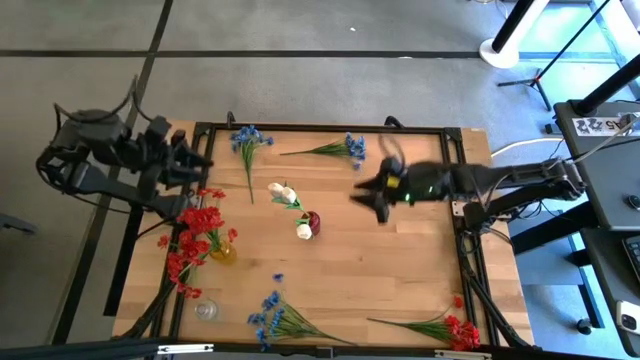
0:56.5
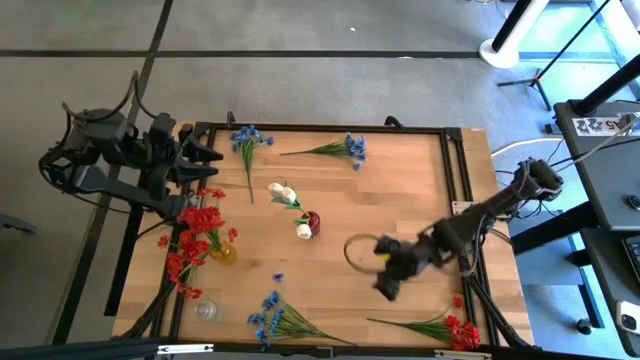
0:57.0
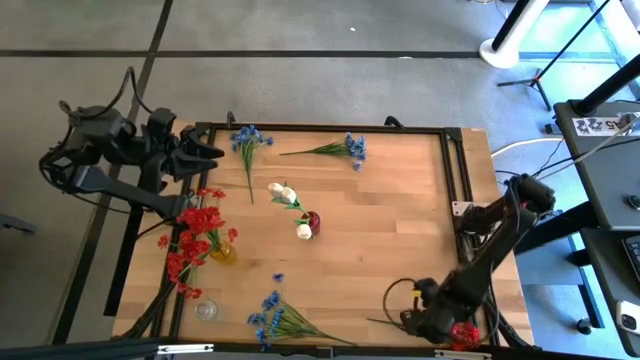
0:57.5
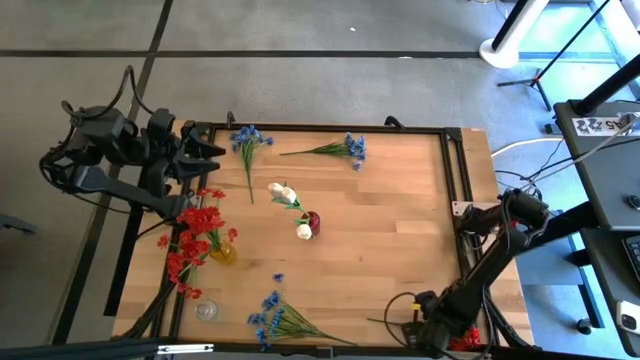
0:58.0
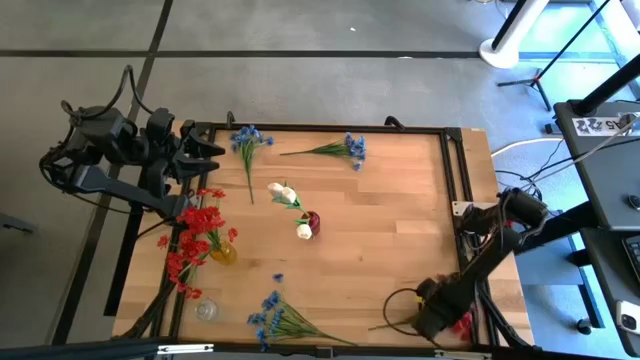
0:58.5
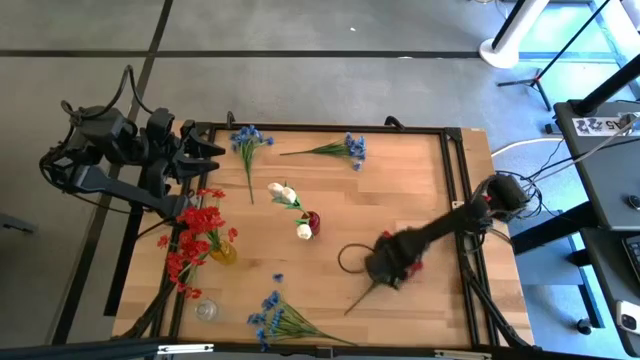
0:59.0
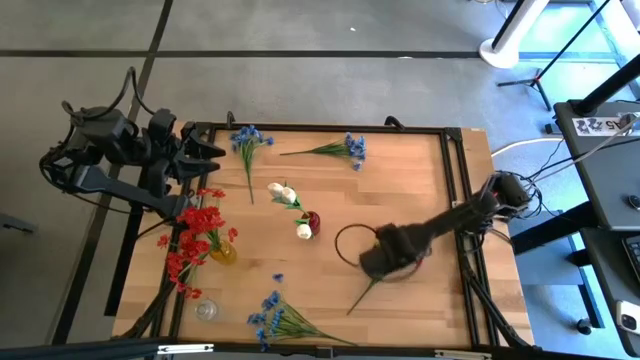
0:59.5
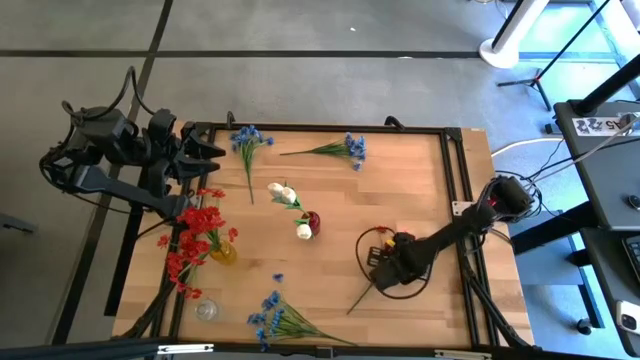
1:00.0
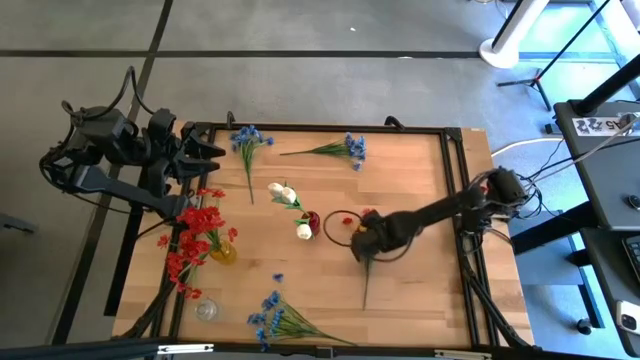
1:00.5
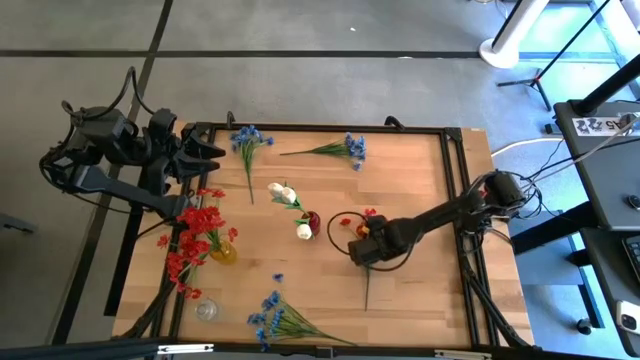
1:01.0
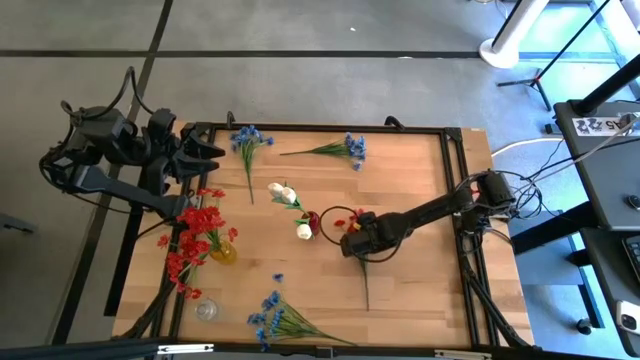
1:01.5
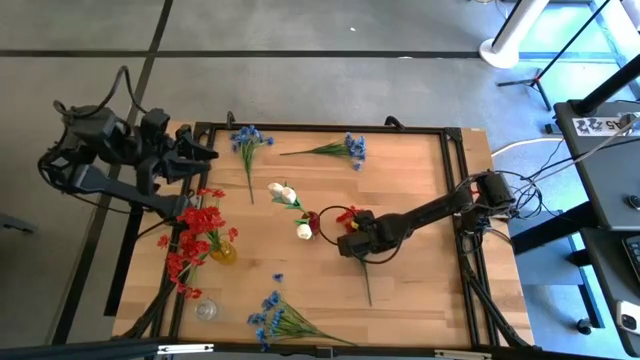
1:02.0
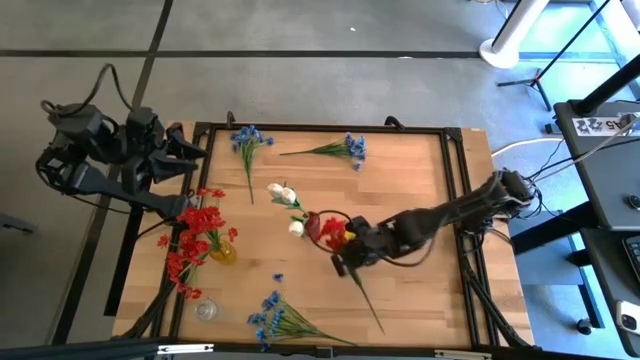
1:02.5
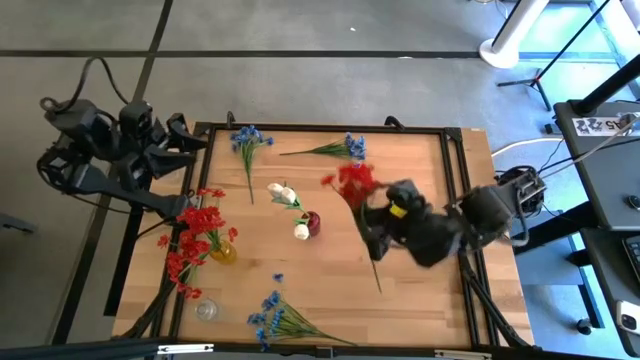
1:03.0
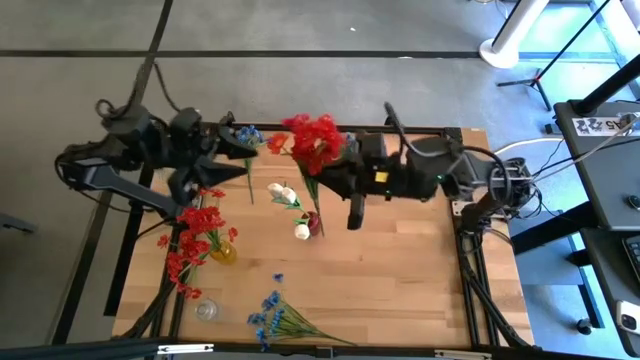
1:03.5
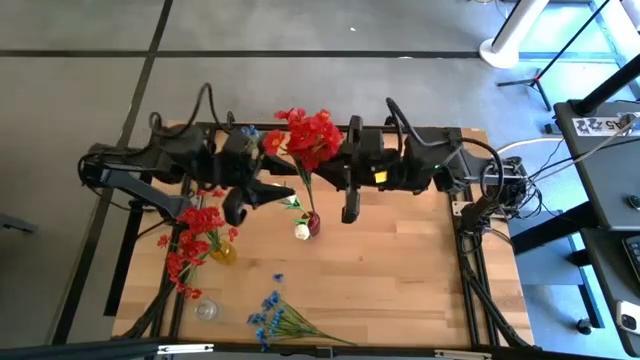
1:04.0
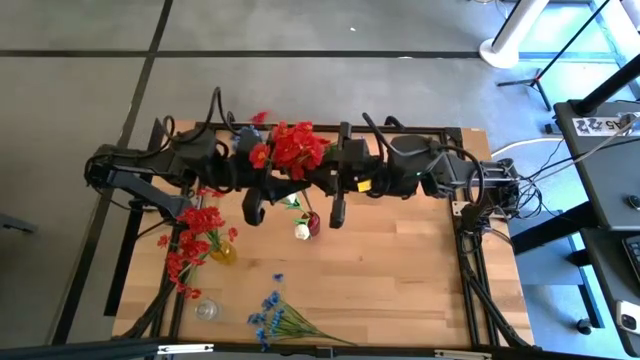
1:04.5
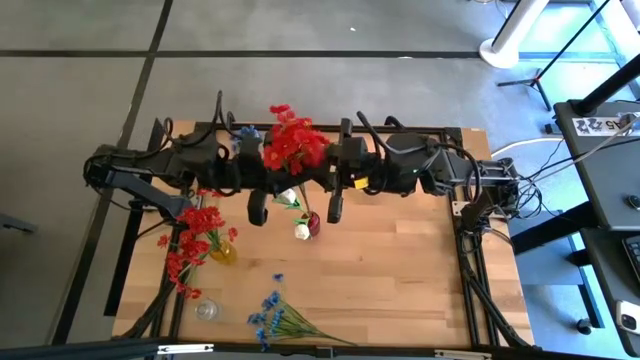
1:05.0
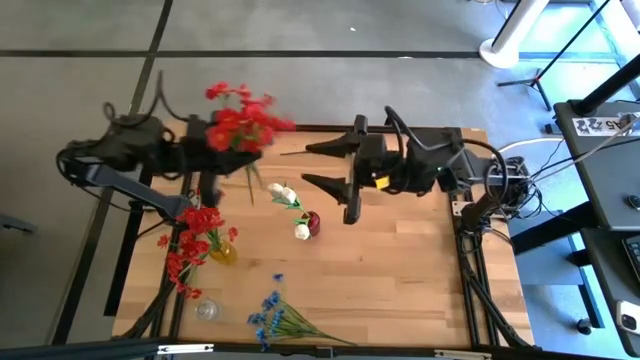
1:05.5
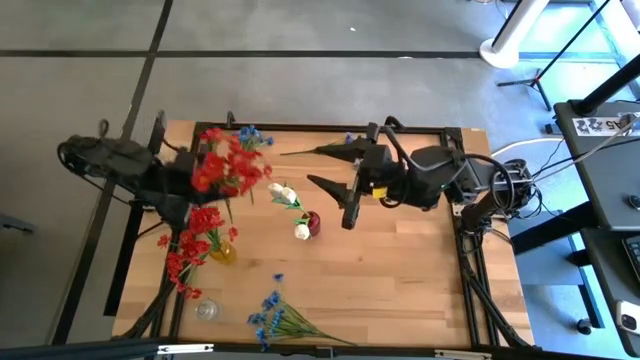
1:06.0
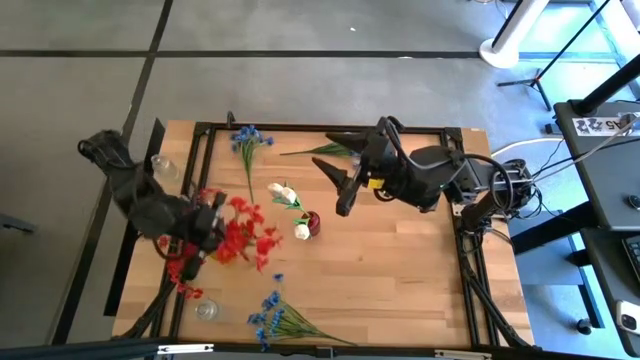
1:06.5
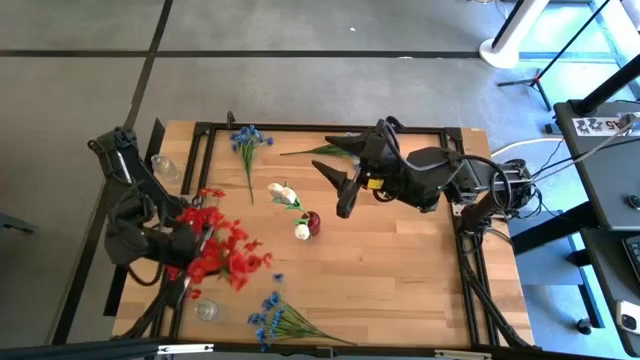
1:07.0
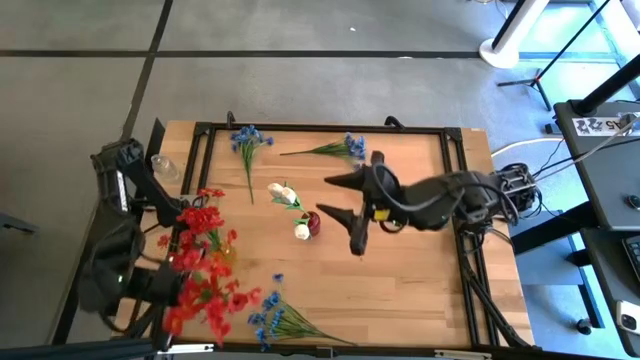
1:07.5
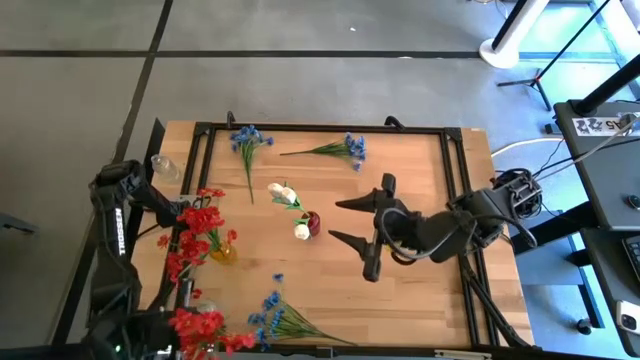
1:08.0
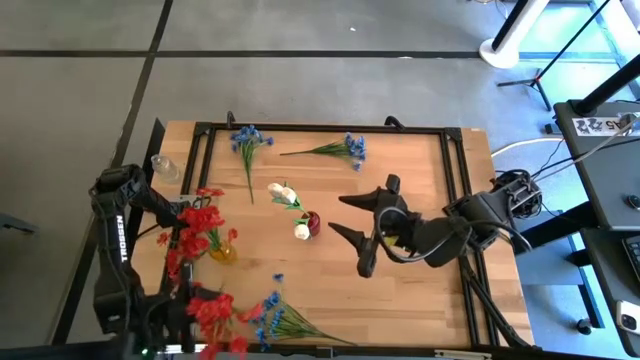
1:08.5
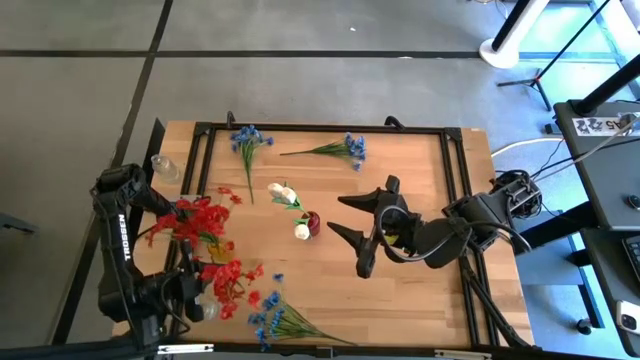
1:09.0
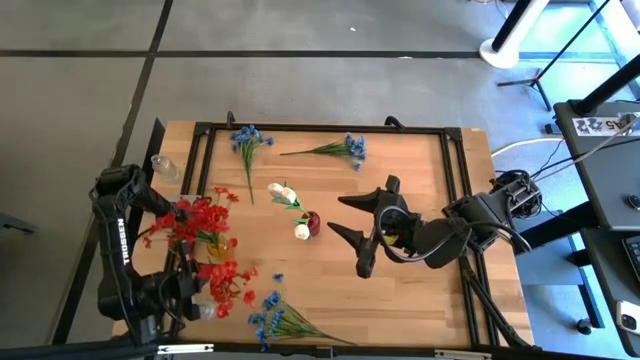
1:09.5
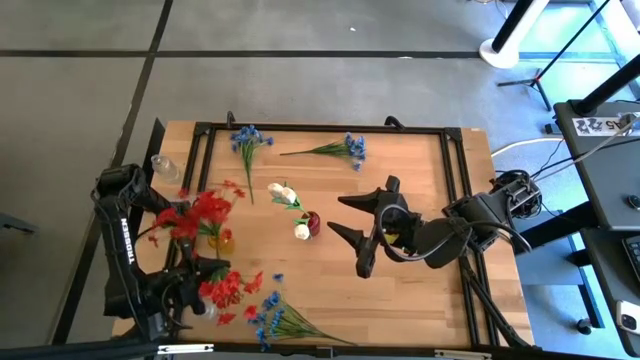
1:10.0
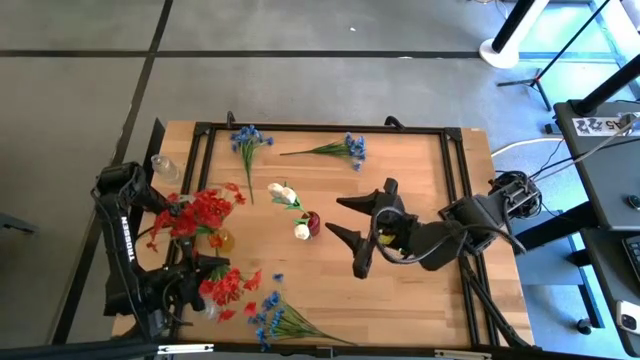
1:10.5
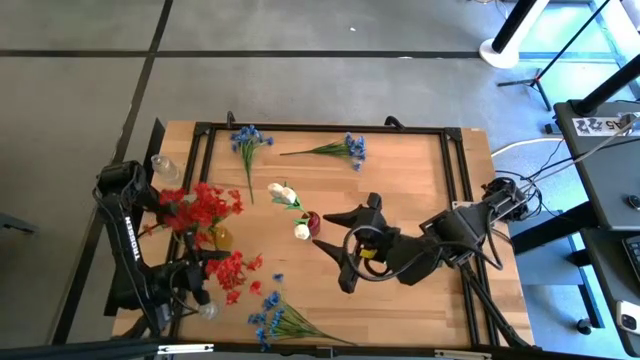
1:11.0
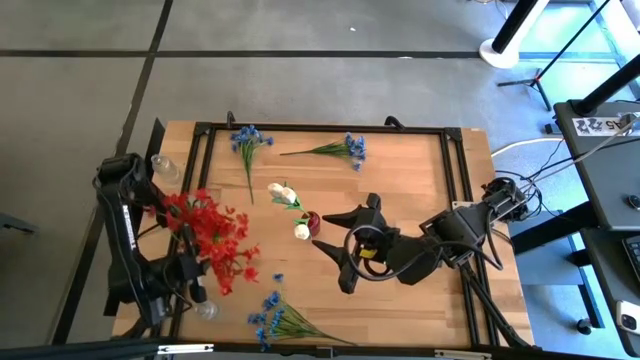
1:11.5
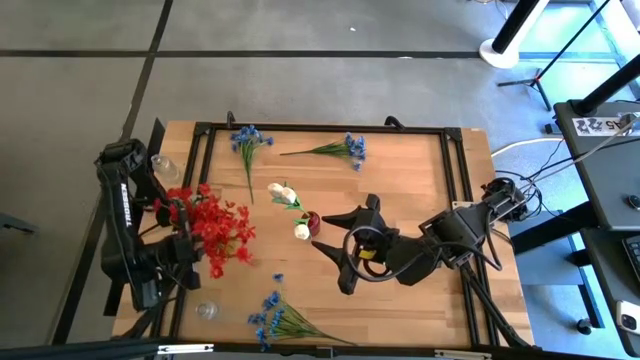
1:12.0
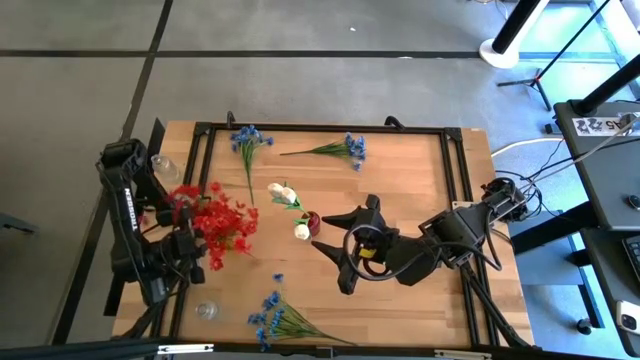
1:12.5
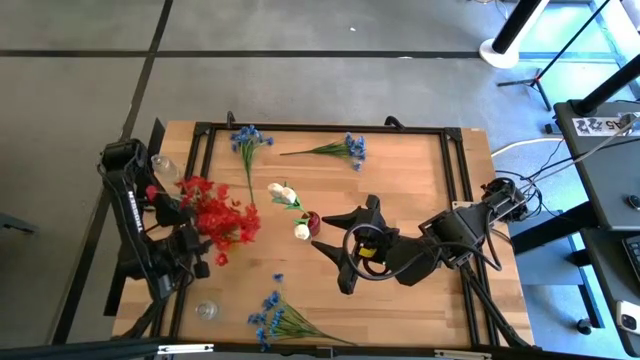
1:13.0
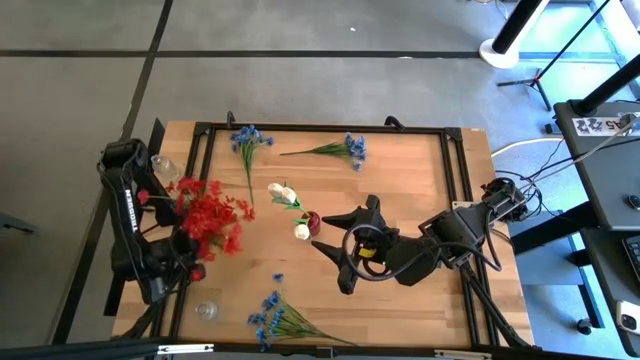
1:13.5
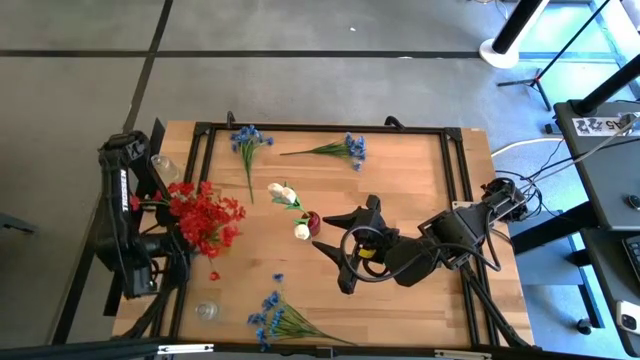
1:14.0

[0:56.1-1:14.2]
Task: Sort flowers into vase by color
Put the red flowers into the yellow vase
